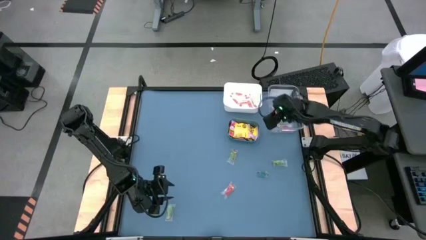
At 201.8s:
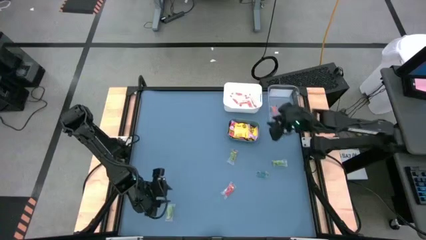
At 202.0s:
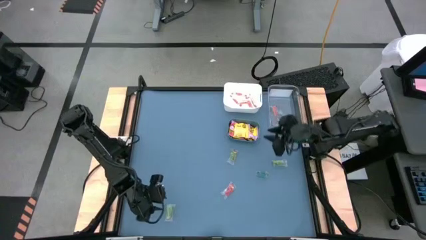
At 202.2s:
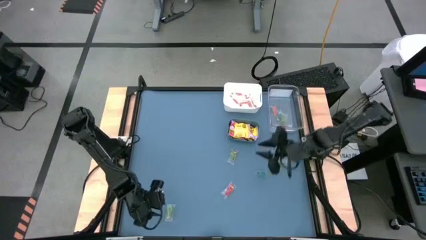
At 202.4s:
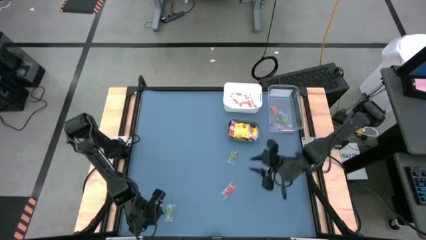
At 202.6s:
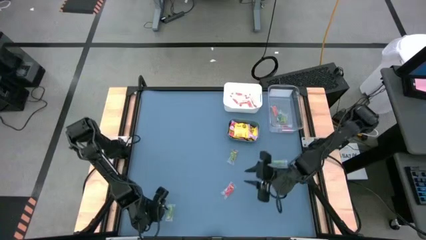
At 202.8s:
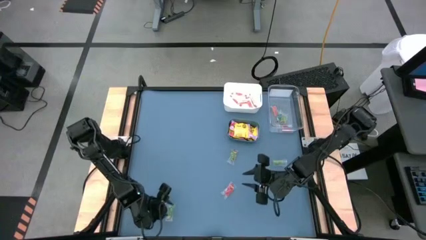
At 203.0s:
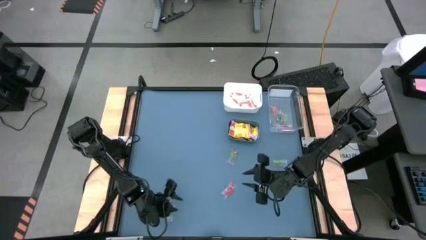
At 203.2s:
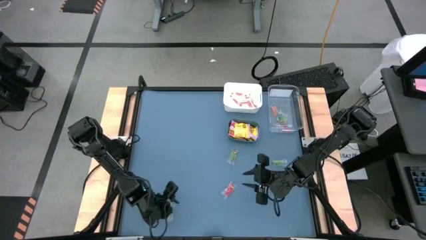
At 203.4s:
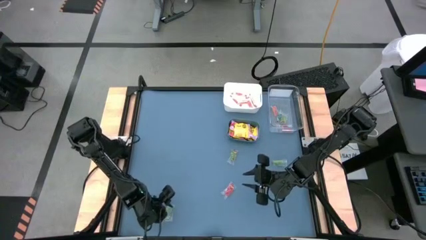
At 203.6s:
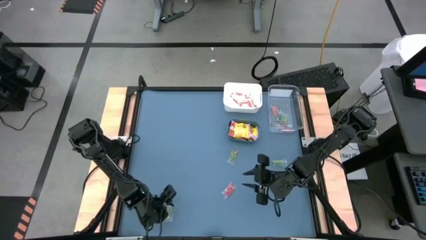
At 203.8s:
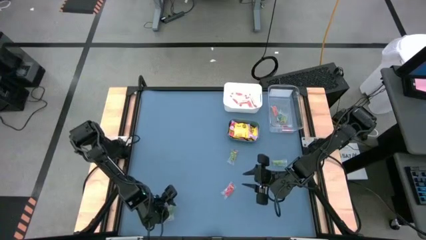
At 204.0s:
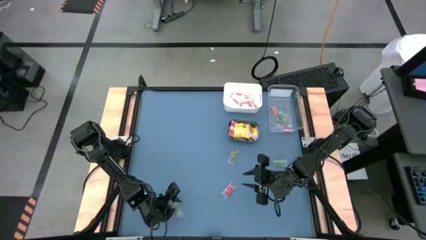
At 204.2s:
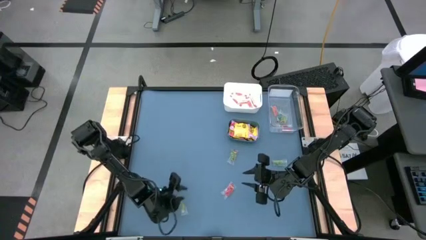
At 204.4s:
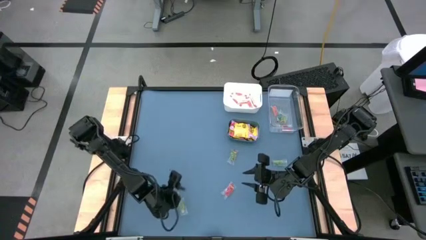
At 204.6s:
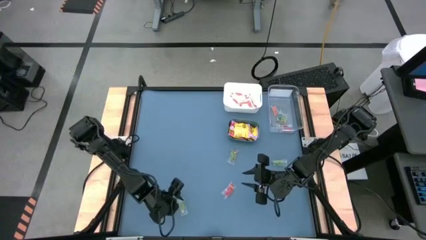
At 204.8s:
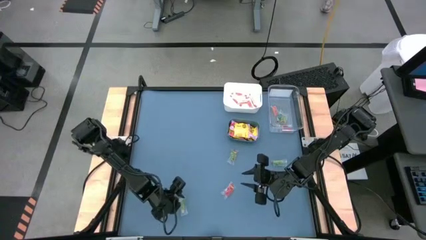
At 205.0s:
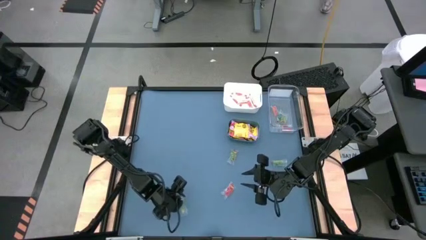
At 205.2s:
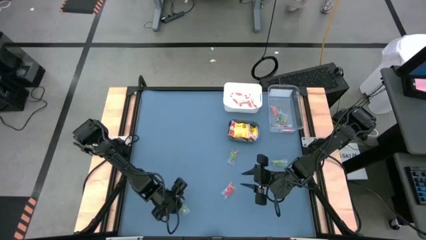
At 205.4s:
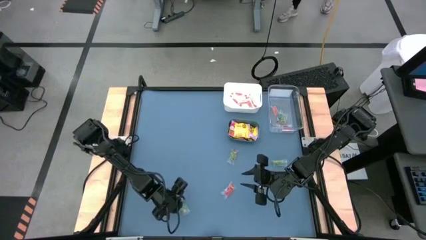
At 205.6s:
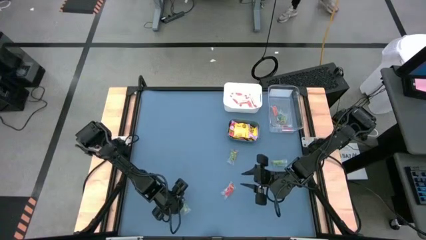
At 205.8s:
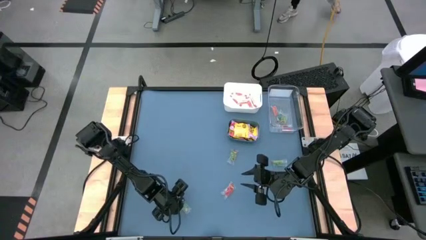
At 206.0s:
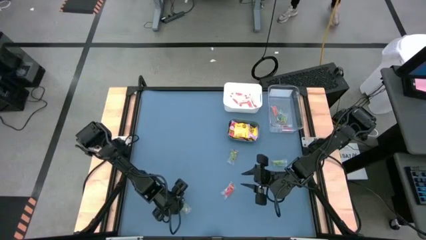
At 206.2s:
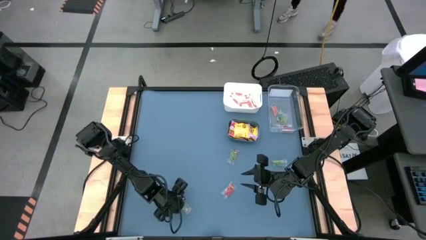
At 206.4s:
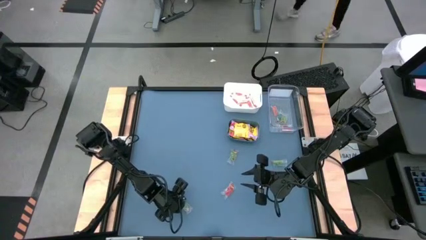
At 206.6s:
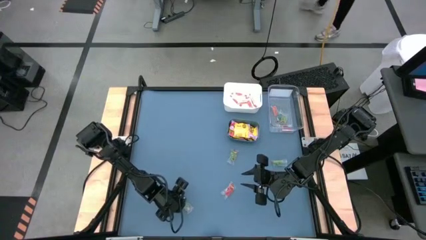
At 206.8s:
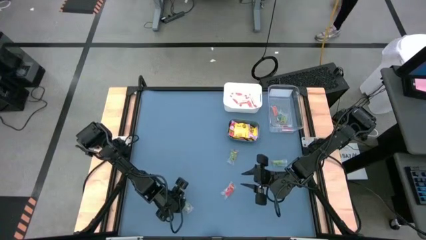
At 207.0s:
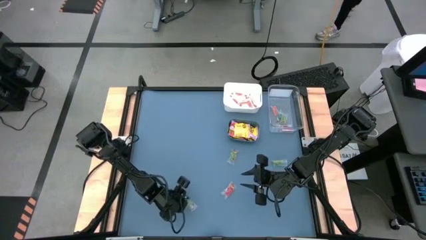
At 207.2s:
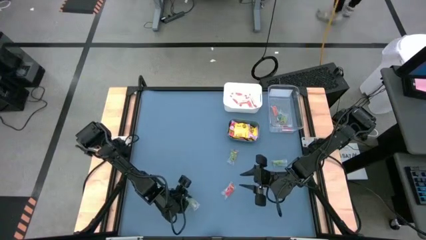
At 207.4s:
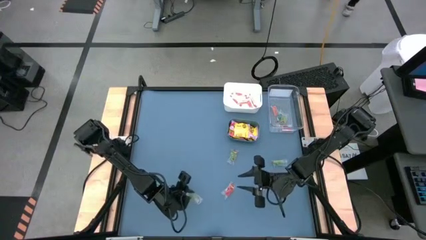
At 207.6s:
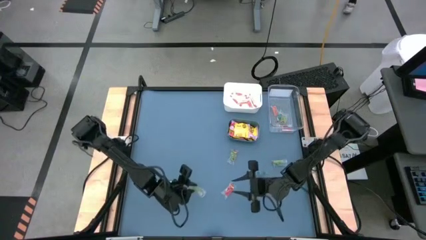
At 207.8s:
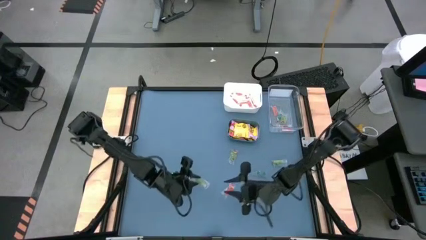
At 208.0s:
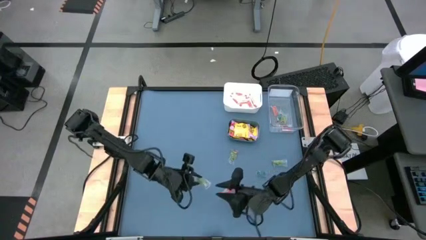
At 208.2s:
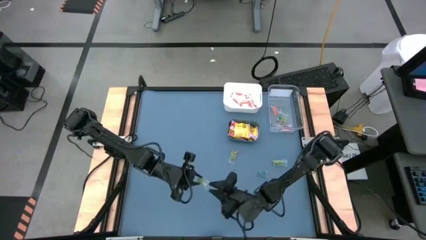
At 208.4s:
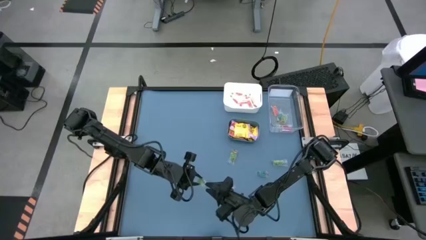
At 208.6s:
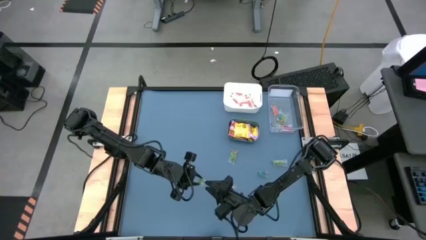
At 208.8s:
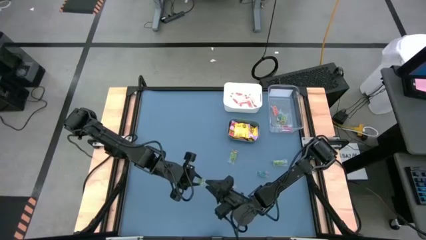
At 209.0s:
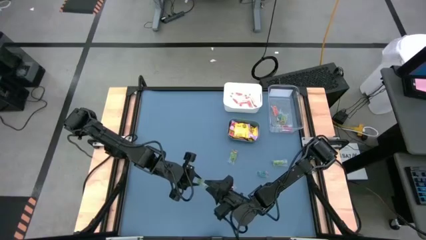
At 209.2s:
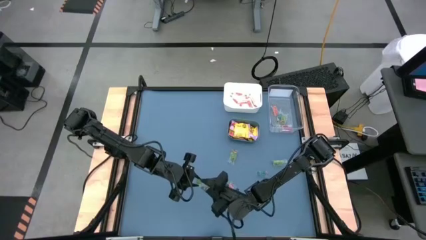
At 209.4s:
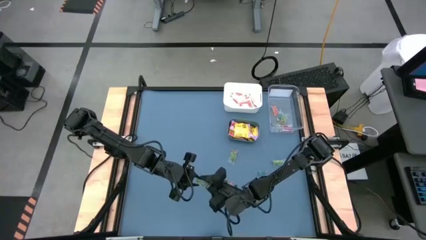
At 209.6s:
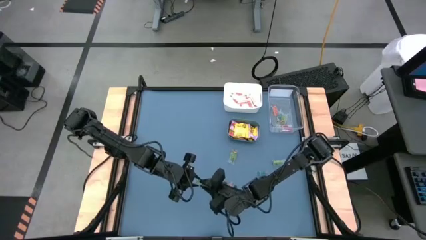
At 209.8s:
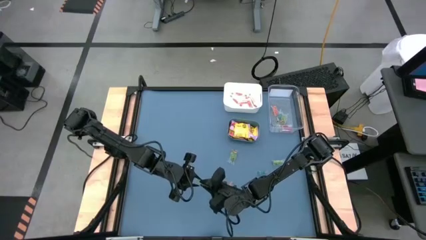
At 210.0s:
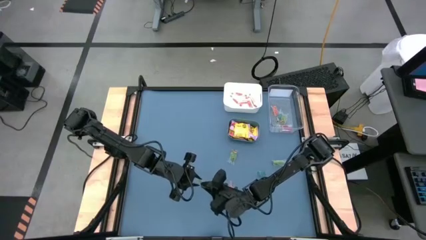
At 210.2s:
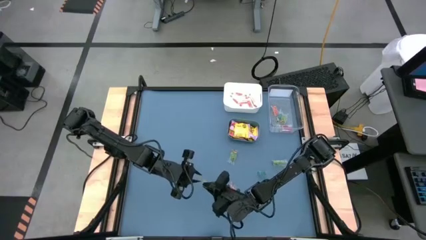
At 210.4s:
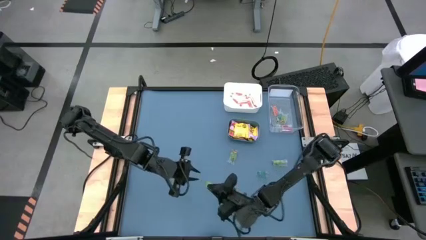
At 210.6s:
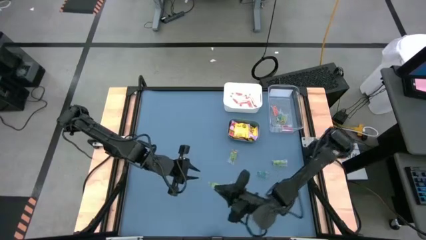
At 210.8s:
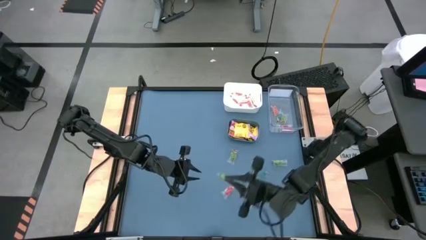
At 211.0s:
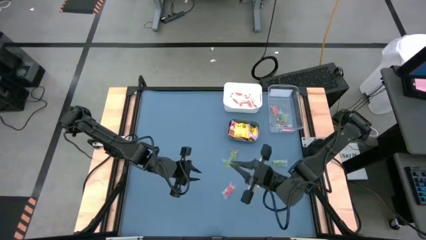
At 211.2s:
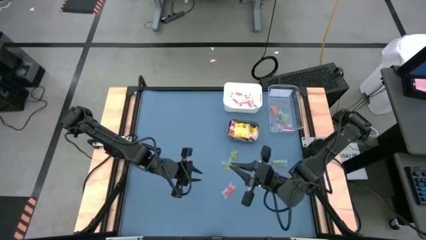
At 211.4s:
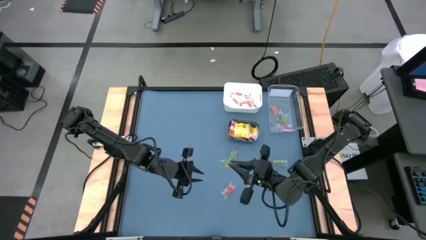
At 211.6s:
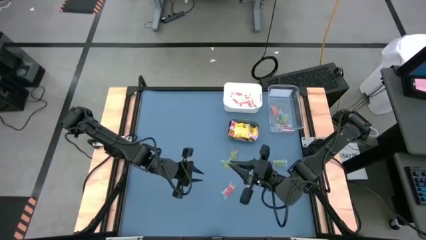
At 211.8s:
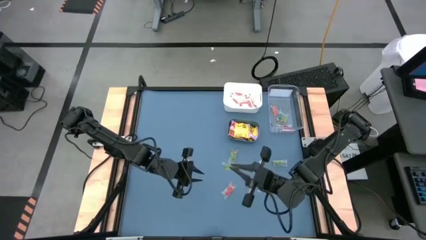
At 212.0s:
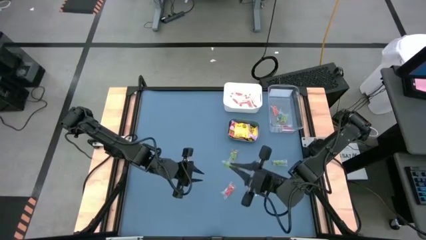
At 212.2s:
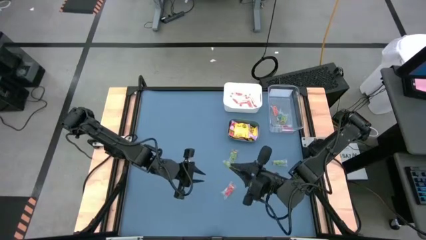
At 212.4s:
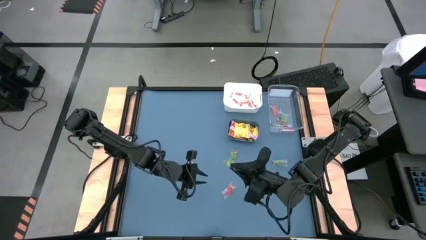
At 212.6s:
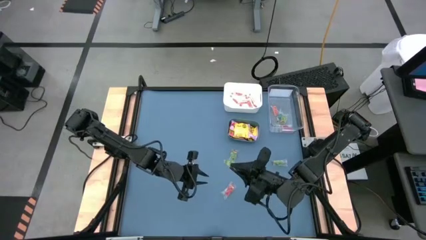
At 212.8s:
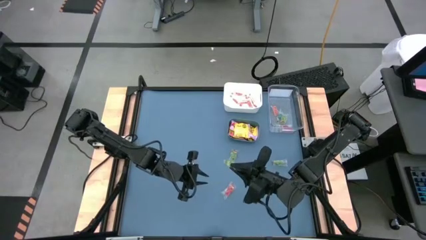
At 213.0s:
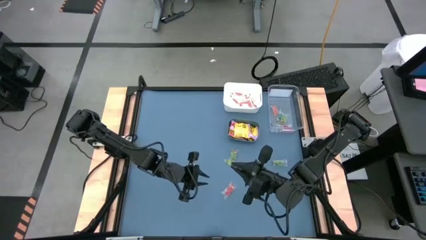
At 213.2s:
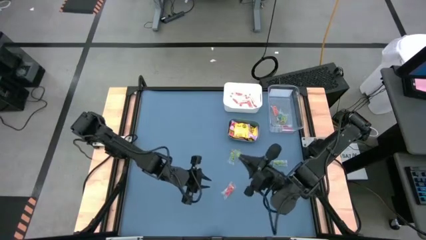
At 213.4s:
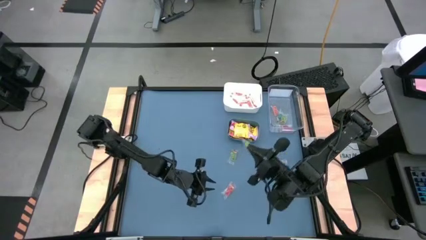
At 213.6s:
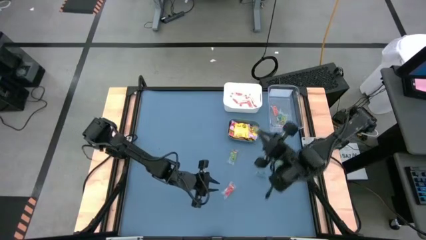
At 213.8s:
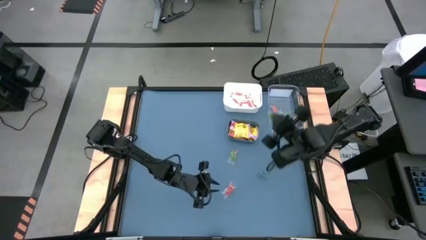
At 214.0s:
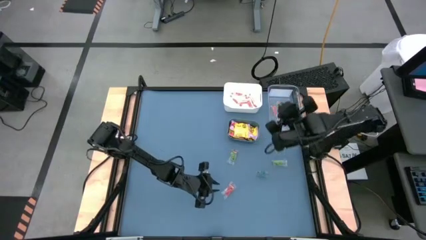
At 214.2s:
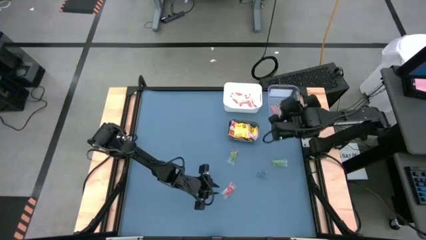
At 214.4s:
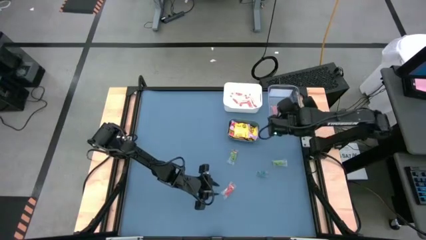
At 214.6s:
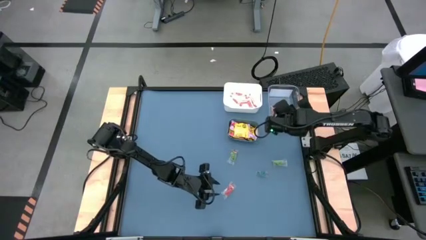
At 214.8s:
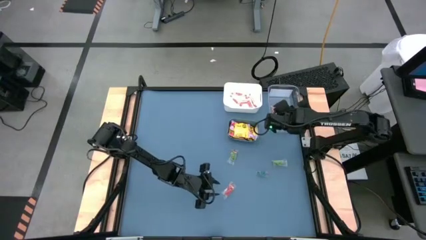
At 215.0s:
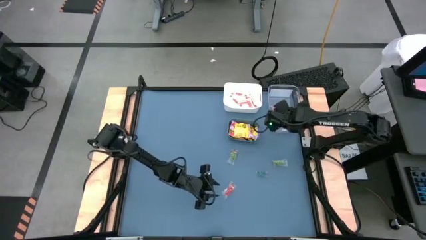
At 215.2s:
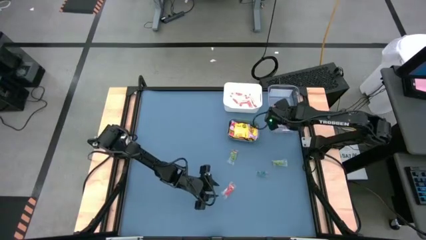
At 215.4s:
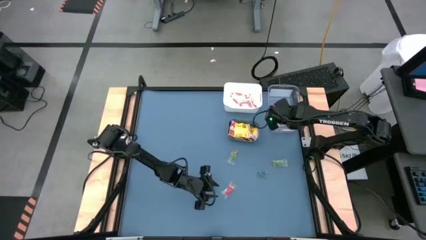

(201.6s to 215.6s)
Task: Sort candy
Put the bottom left green candy into the transparent bin

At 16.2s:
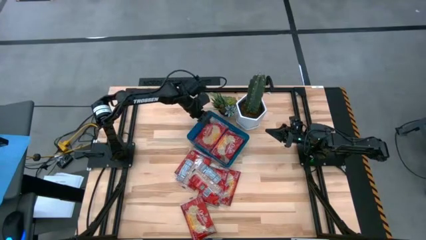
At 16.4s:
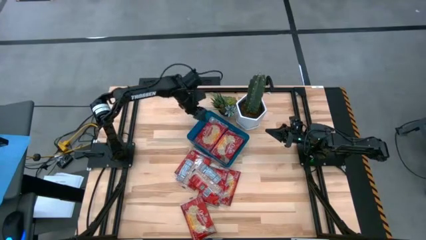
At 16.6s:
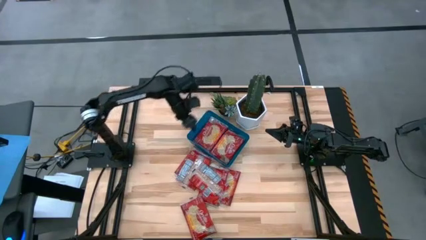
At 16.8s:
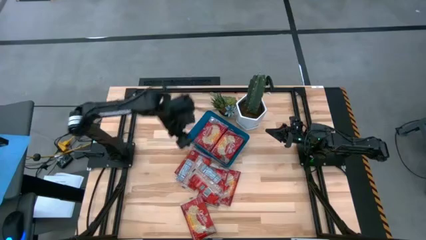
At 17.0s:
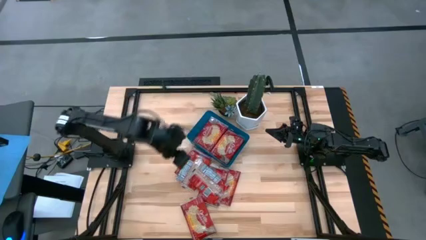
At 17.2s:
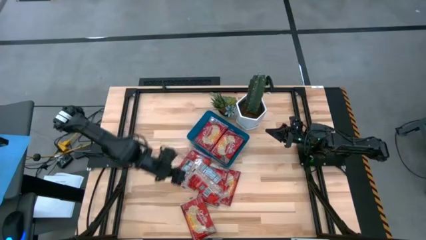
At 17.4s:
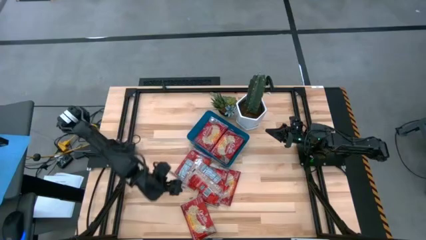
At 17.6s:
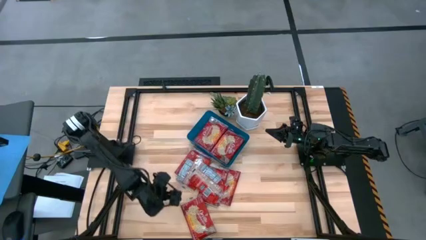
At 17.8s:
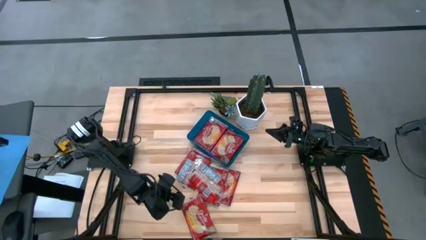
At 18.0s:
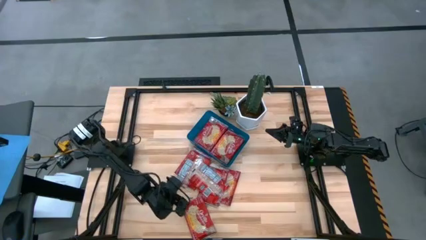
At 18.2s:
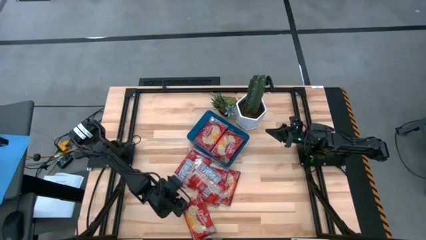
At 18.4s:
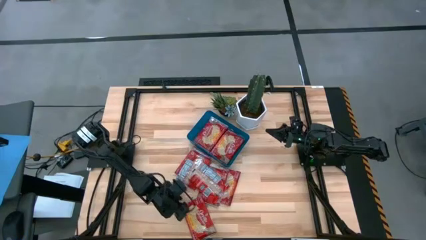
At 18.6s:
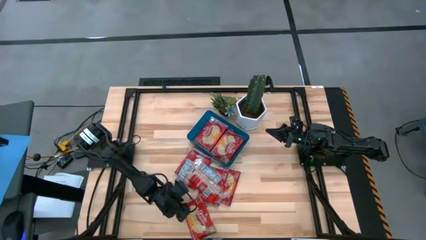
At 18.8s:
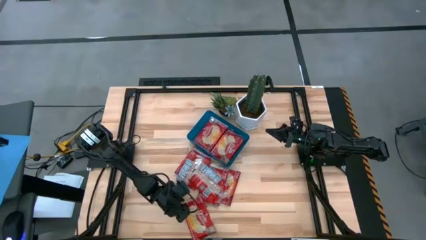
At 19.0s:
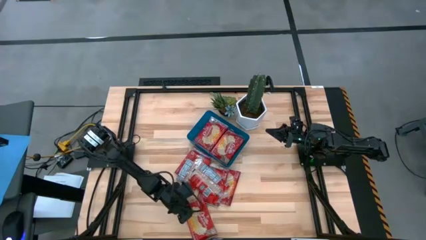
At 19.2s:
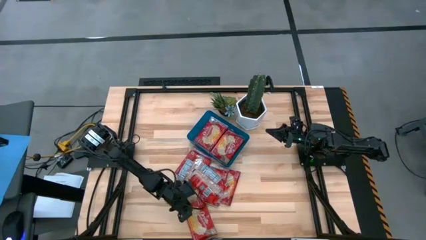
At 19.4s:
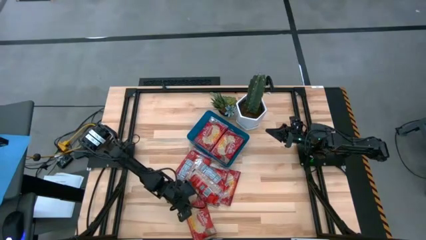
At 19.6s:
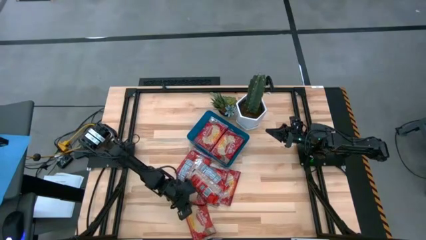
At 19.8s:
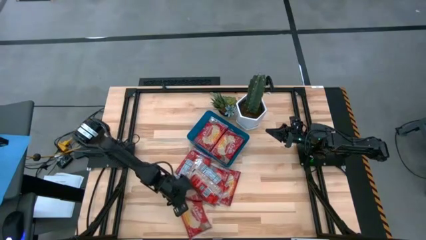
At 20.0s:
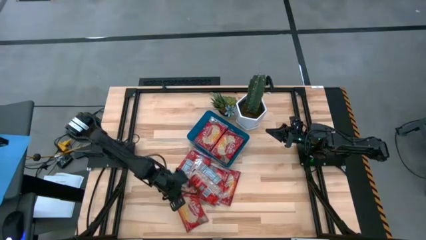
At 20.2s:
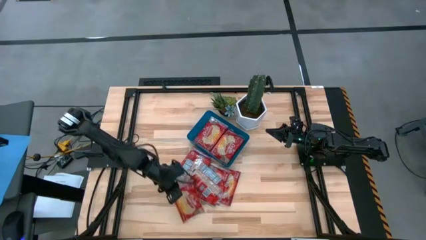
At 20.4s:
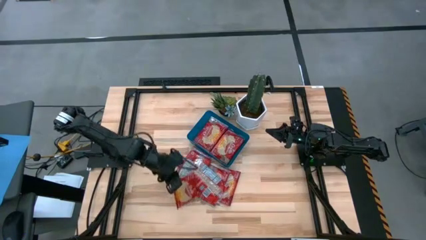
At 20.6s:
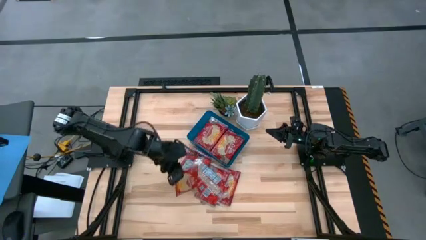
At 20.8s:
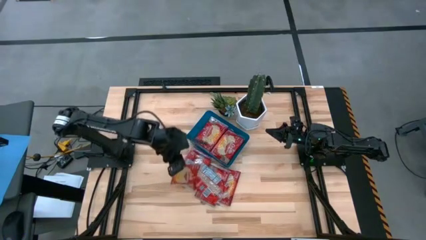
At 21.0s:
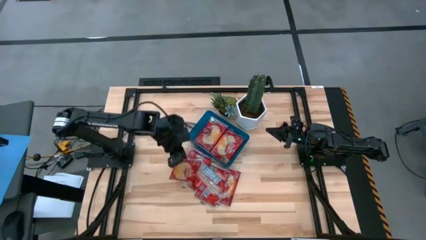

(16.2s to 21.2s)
Task: Sort popcorn bags into baskets
Put the popcorn bag into the blue bin
